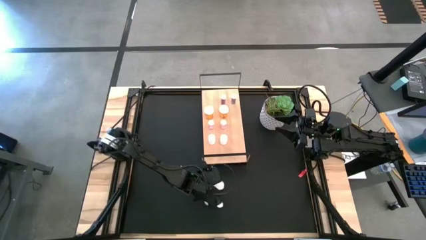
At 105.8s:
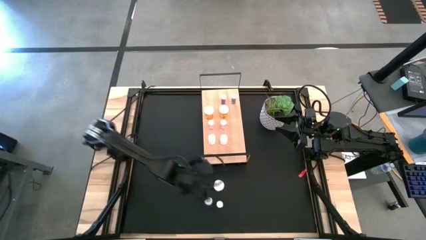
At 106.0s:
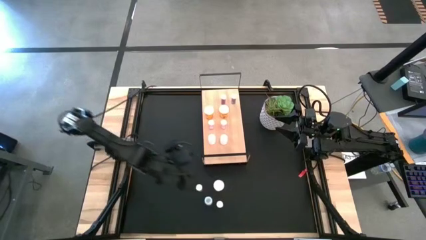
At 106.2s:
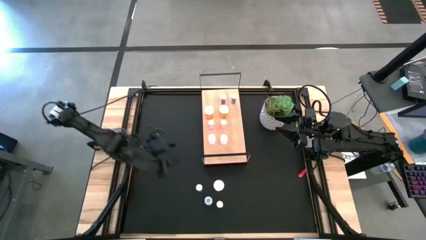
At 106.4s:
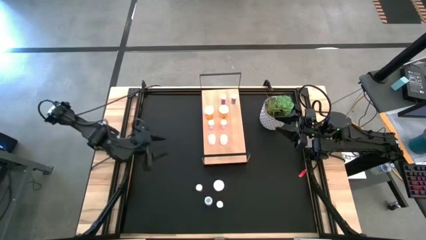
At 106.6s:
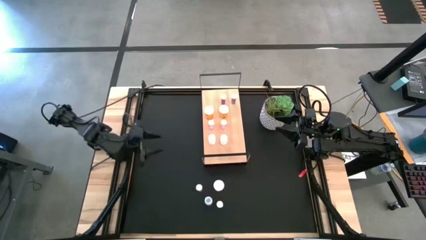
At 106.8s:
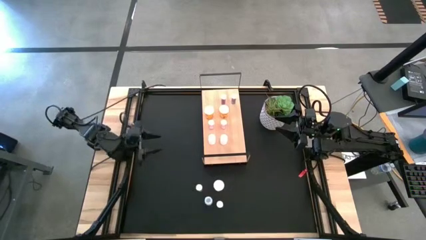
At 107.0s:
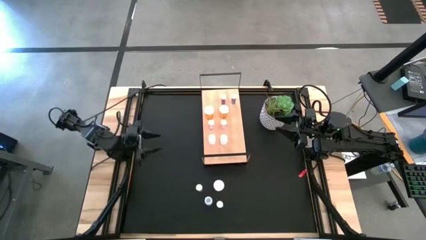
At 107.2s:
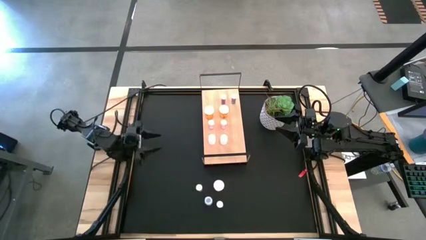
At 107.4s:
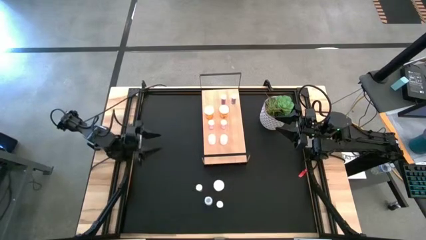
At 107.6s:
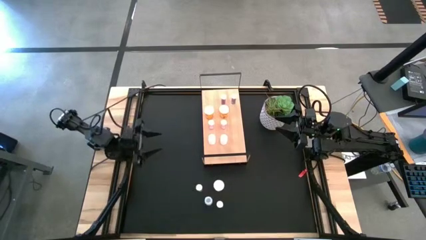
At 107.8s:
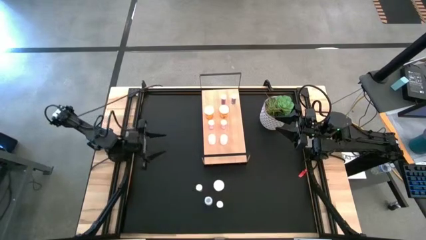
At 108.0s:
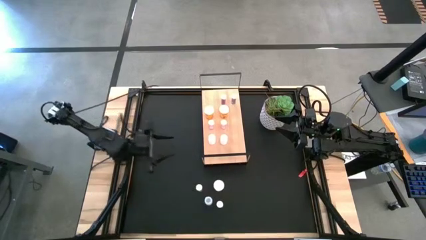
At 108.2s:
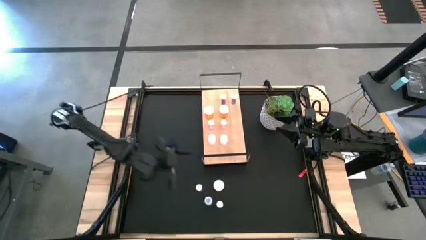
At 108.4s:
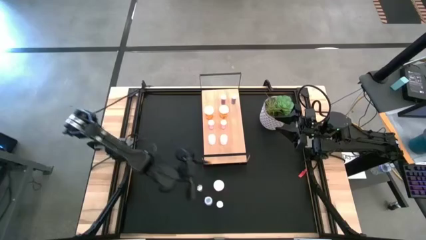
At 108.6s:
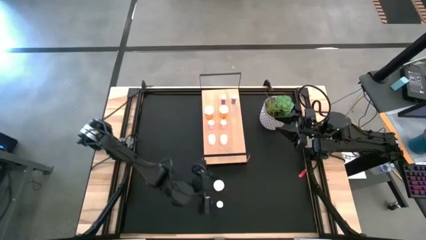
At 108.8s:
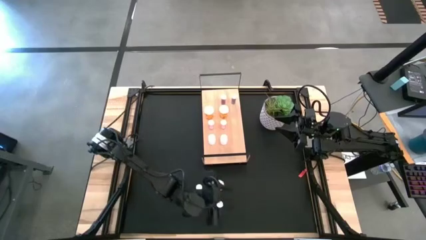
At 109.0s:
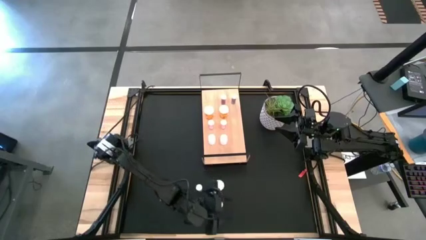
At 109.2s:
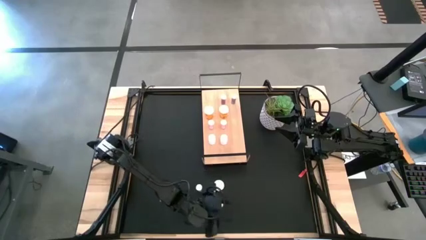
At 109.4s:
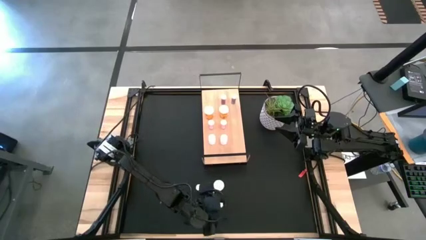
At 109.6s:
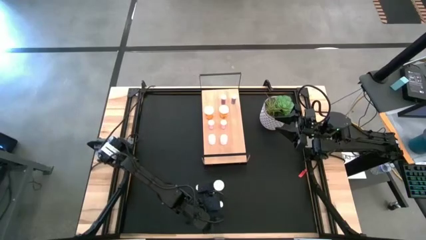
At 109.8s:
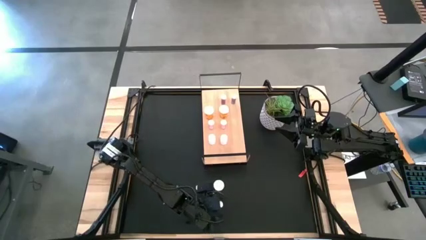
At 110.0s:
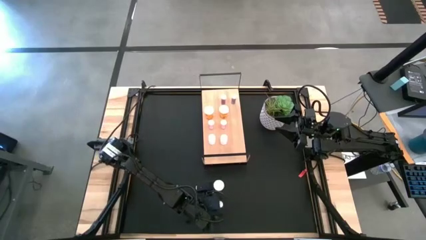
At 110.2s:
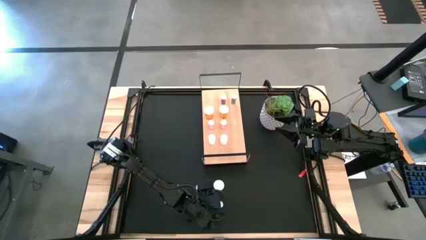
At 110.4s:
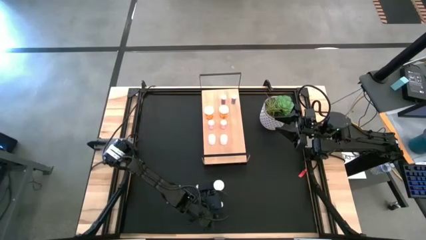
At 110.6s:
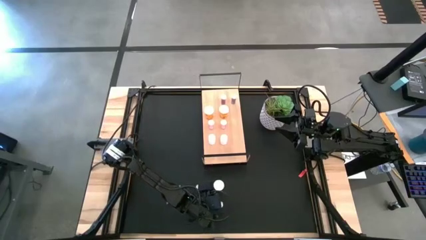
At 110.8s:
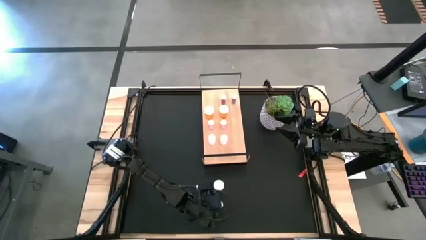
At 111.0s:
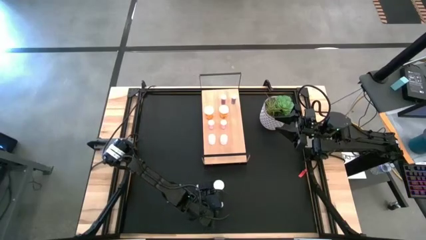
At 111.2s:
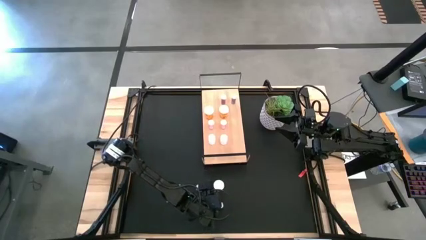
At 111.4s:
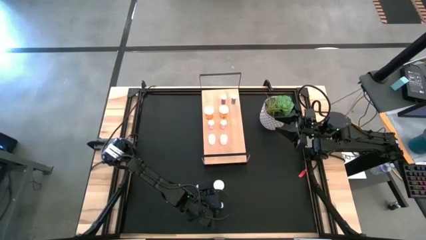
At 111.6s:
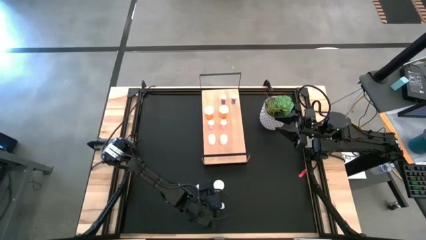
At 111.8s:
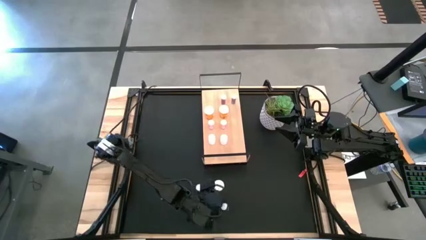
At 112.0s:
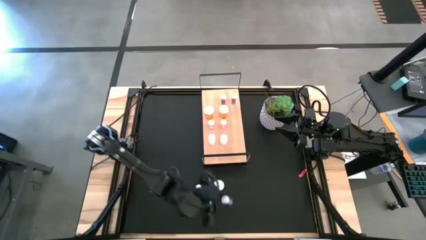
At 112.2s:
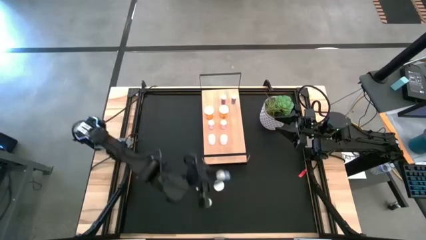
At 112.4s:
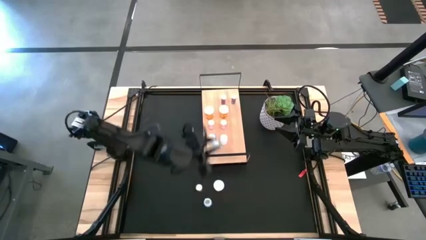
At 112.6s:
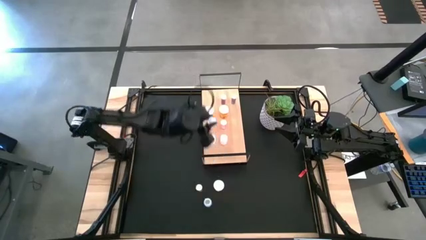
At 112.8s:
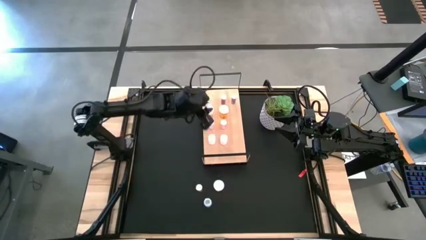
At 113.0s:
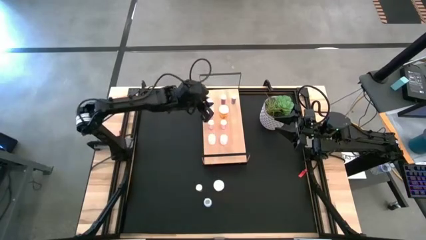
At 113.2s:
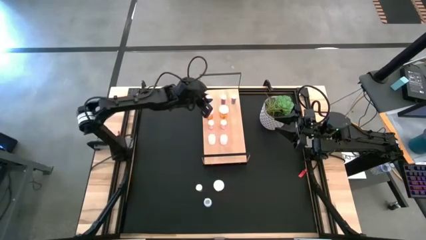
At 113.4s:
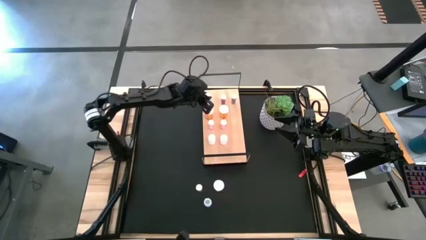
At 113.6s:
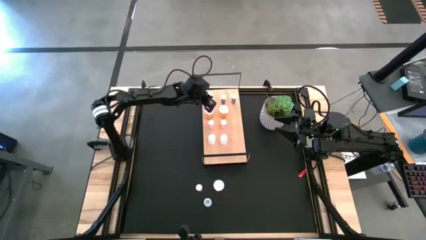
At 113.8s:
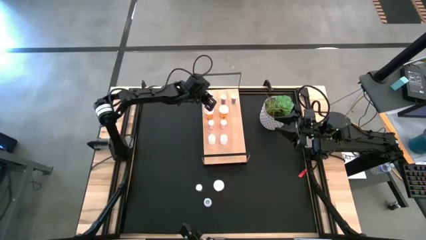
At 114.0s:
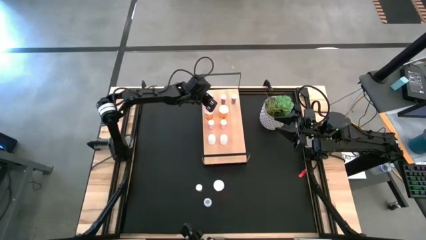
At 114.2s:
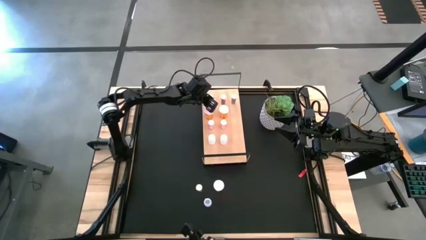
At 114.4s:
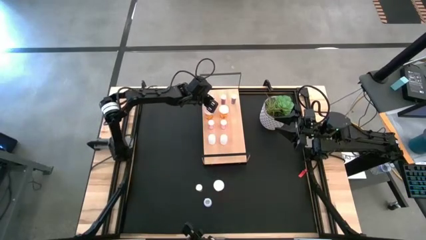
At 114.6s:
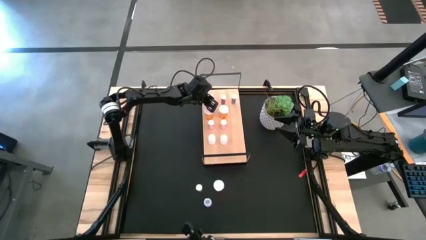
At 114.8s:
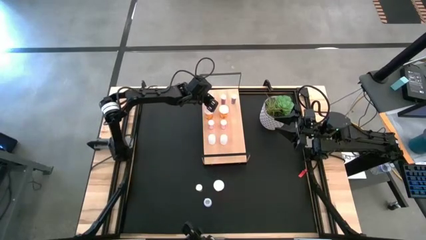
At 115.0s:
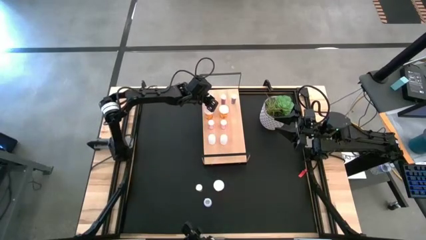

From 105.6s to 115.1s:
Task: Pick and place medicine bottles onto shelf by color
Put the blue pill bottle on the shelf aligned with the blue pill bottle

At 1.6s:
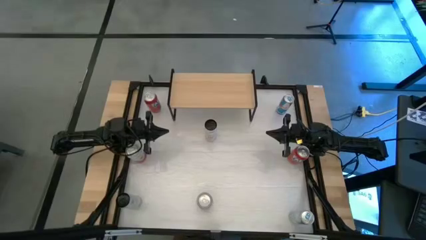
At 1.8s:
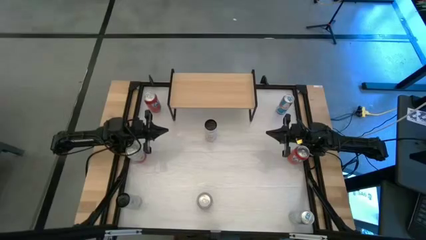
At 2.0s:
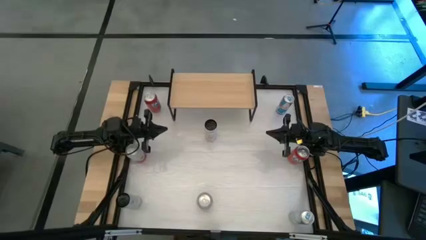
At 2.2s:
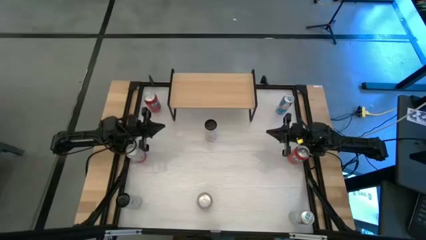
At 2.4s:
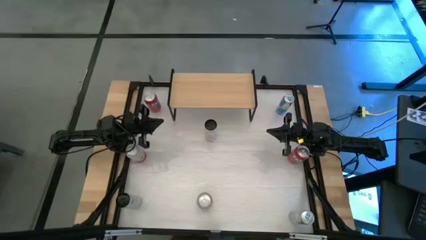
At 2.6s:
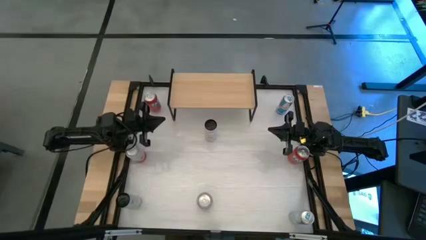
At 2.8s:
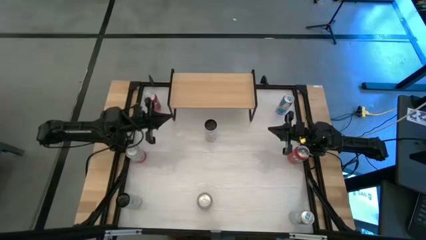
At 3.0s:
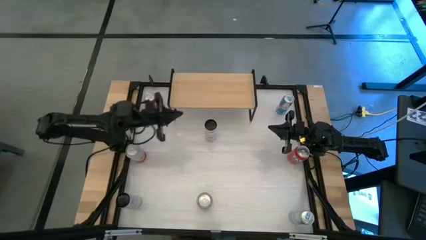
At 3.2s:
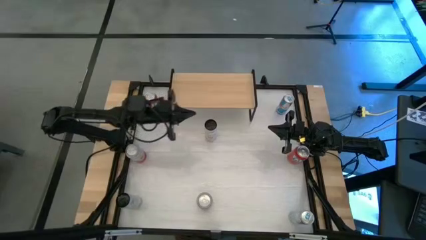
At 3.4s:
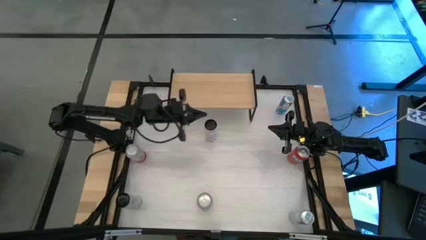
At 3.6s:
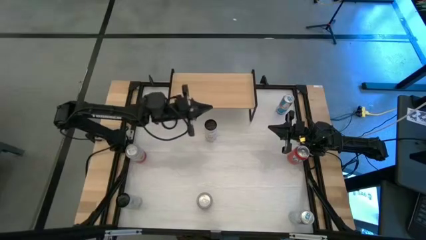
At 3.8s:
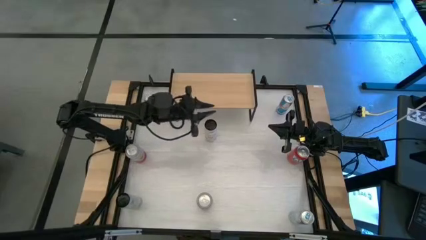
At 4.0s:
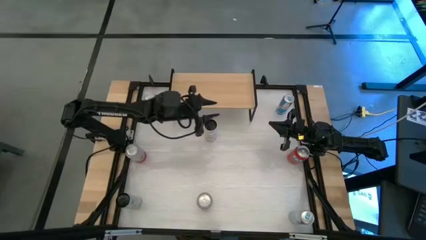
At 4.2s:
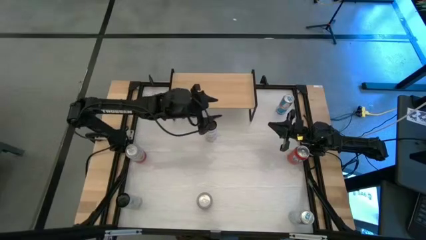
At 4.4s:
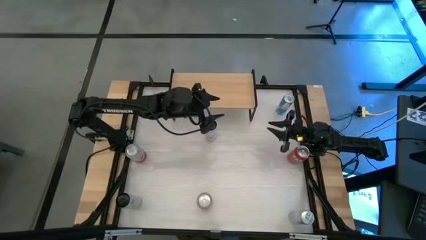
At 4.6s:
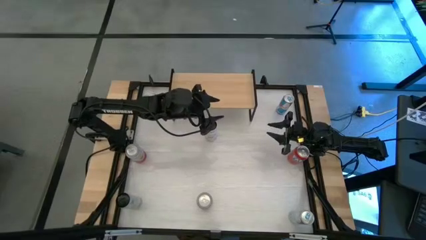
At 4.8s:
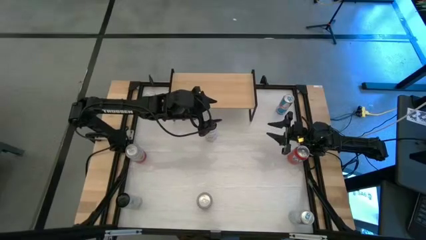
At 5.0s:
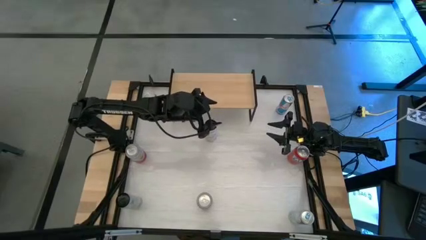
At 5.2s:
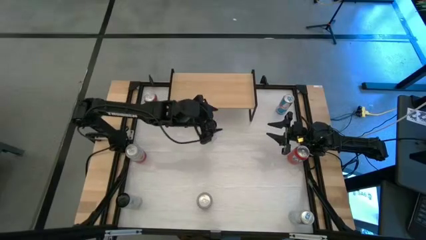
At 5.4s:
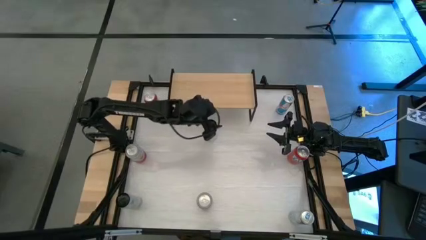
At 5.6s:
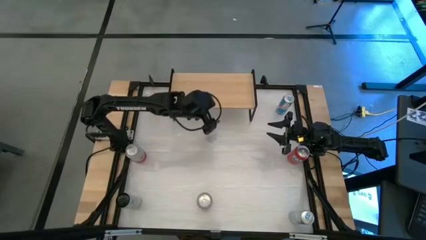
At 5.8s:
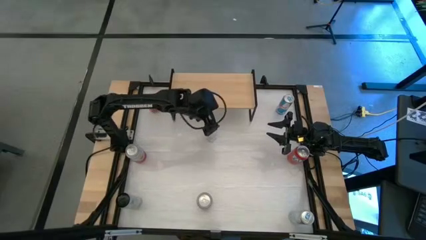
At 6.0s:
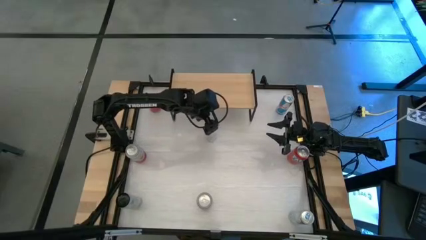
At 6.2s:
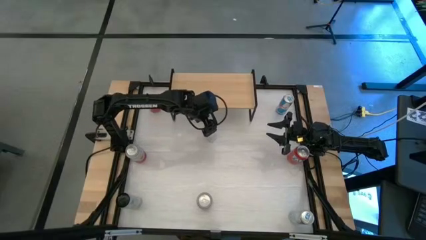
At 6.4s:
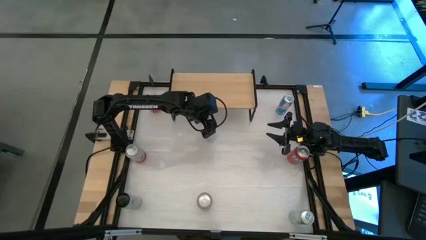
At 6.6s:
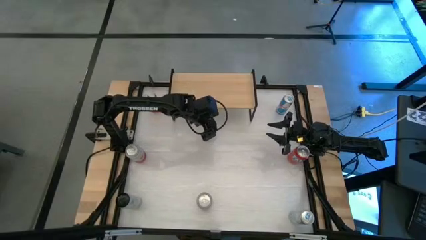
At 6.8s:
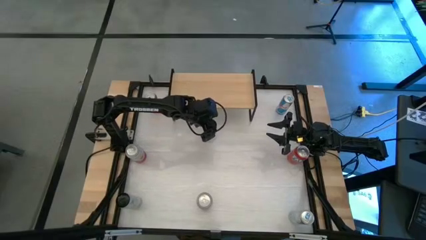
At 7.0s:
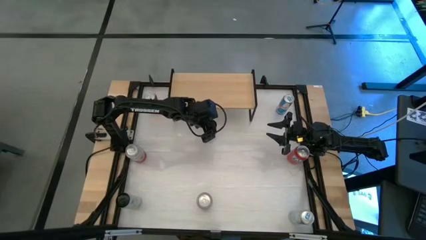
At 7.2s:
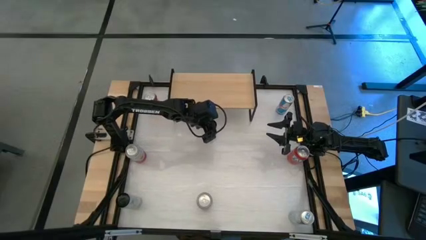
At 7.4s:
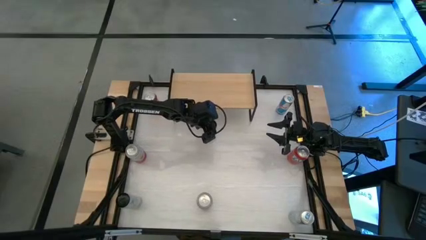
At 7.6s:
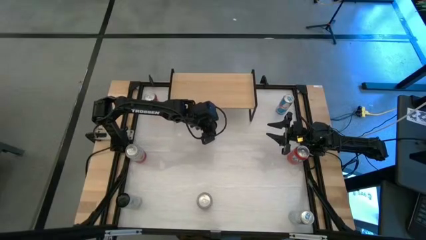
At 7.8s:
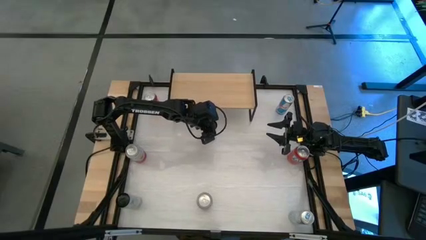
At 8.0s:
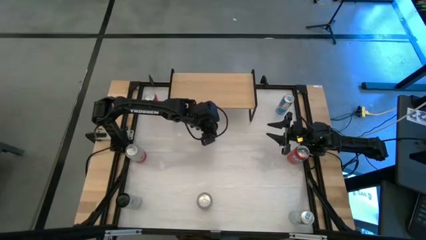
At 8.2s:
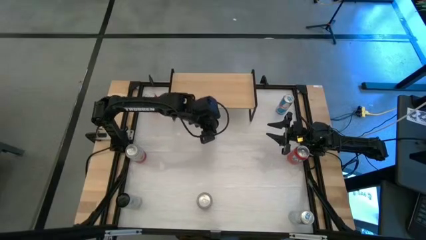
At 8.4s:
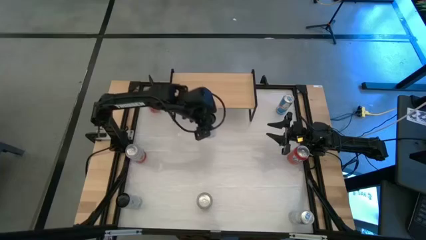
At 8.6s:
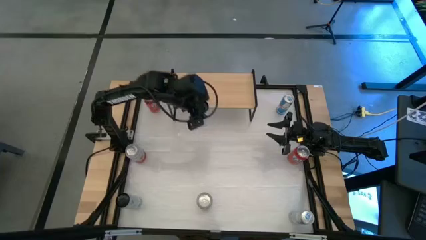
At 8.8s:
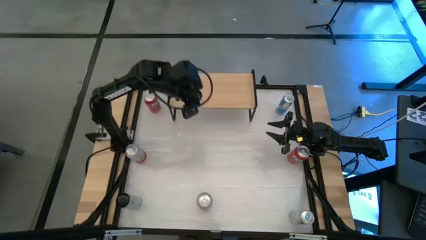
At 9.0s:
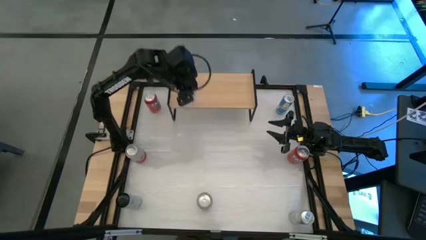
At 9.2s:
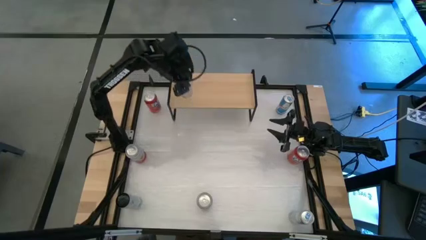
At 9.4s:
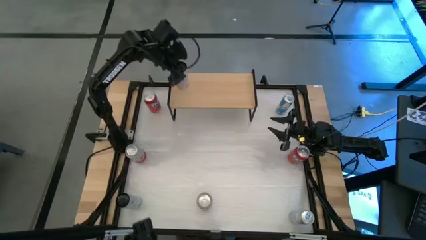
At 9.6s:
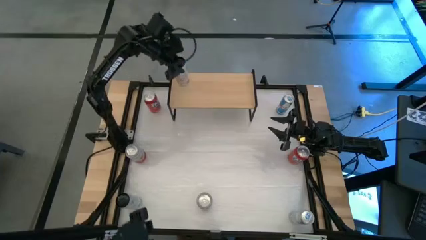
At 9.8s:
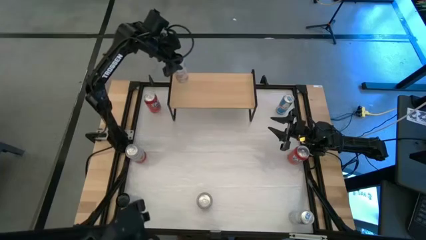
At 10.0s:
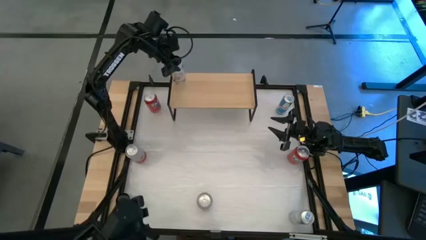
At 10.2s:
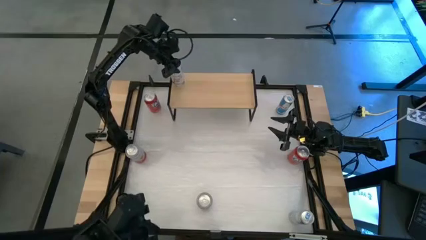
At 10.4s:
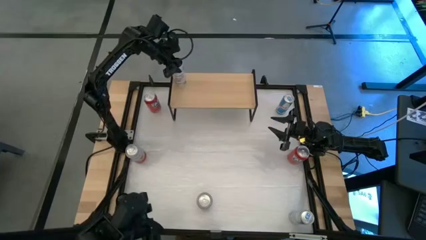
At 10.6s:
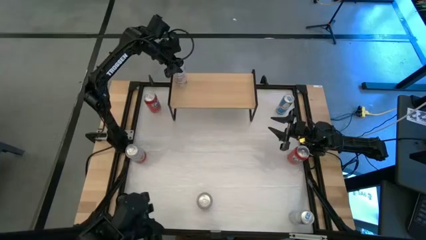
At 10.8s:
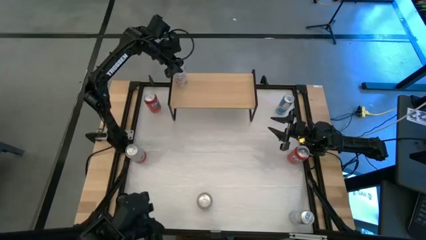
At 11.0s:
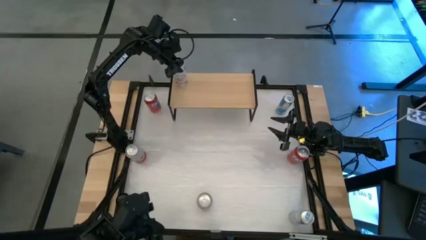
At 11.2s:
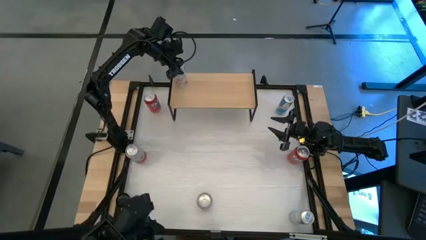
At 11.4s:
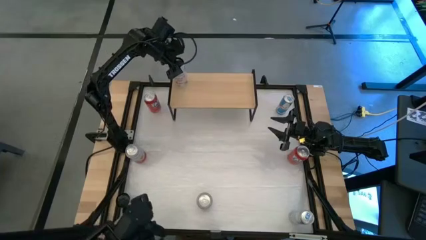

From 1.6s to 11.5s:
Task: Place canned beverage on shelf
Put the top white-pink soda can on the shelf
